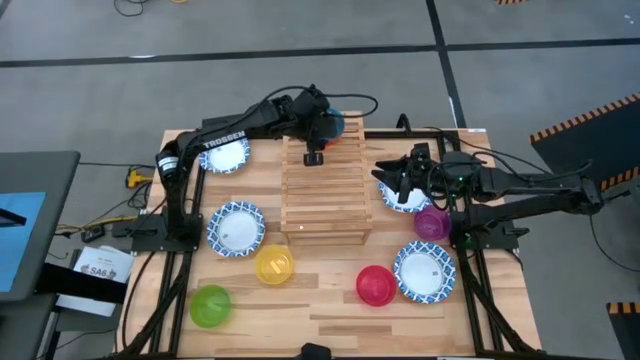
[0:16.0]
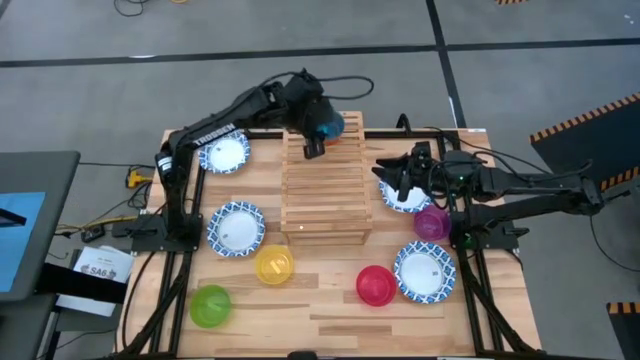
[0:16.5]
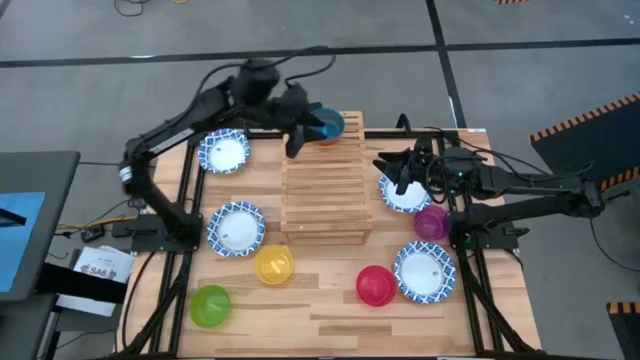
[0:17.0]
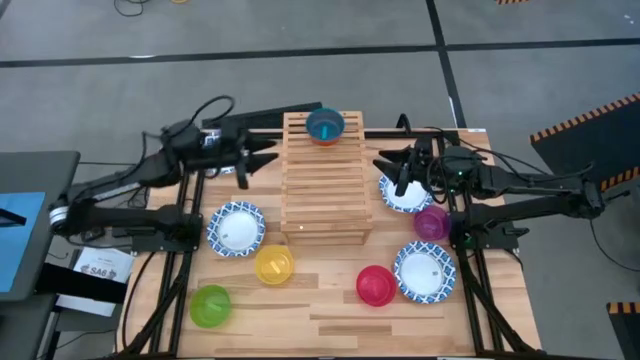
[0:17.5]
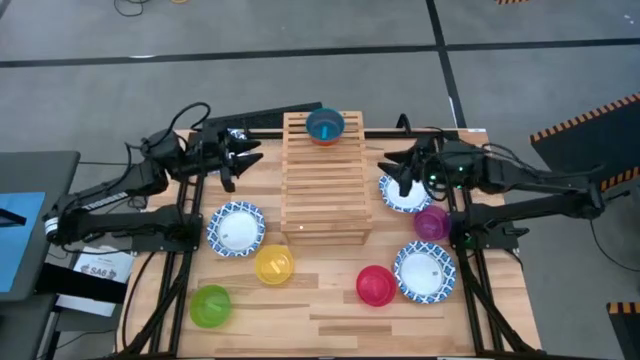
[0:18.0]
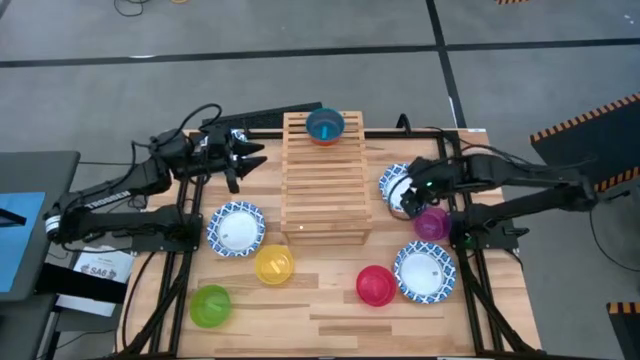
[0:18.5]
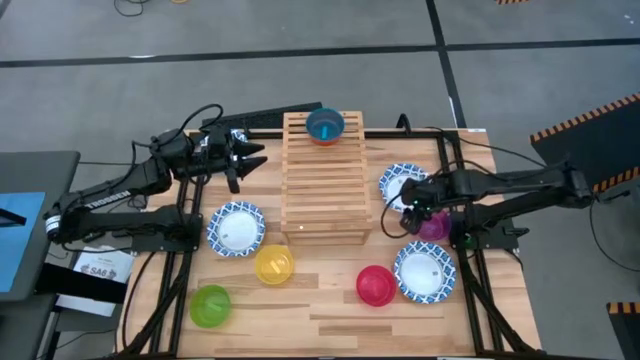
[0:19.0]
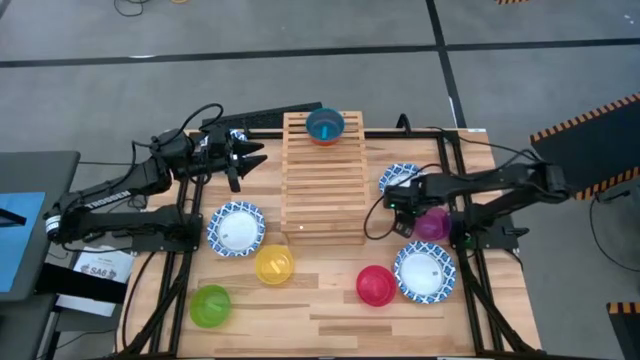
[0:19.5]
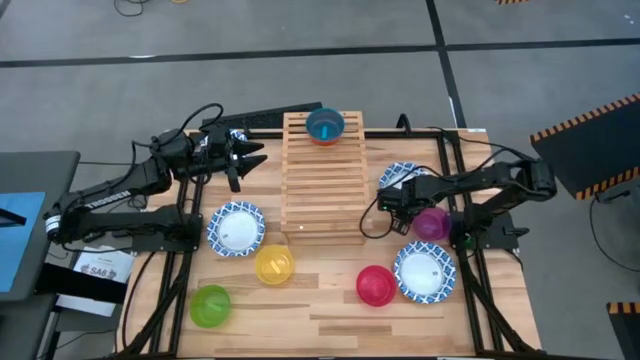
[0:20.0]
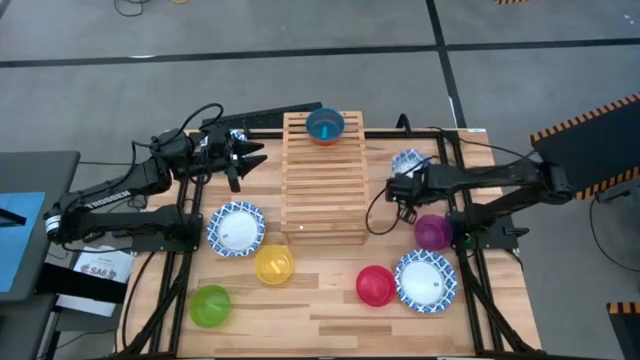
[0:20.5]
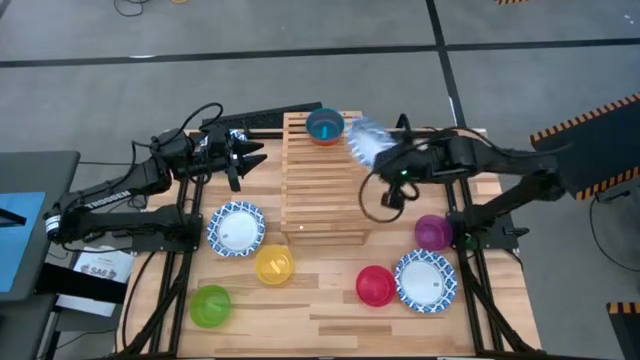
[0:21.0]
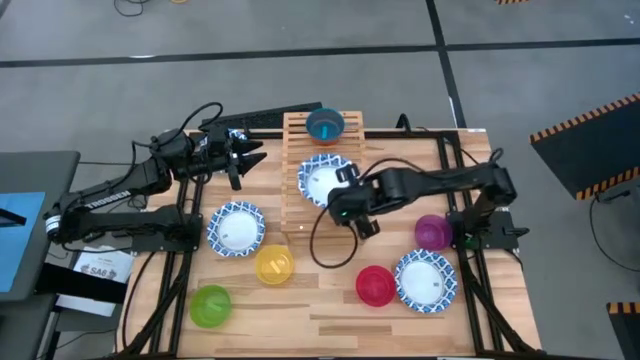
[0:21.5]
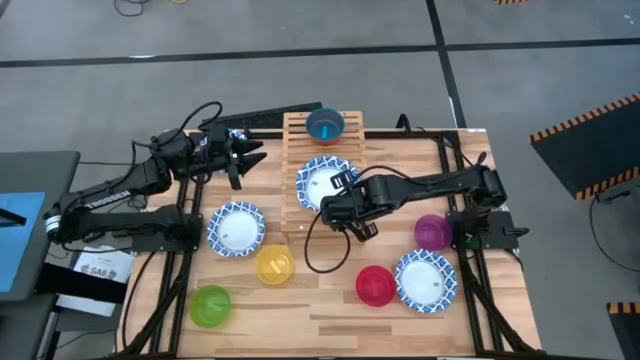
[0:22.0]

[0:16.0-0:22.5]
Task: Place and stack bowls onto a shelf
Put the blue patterned bowl on the shelf

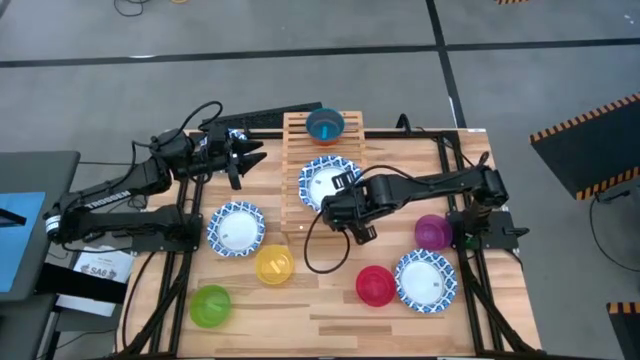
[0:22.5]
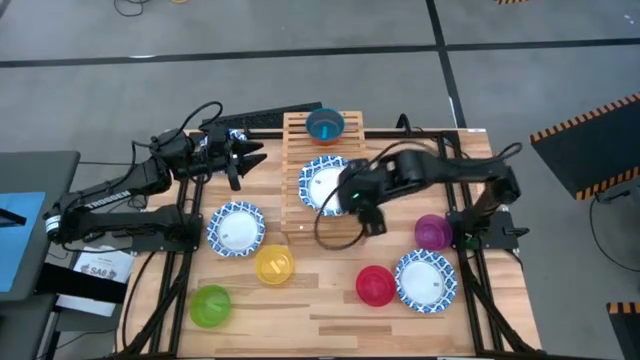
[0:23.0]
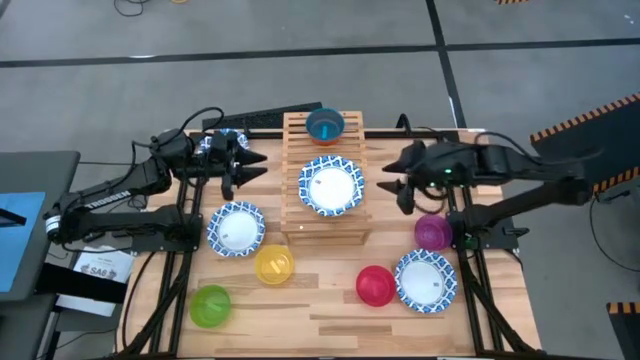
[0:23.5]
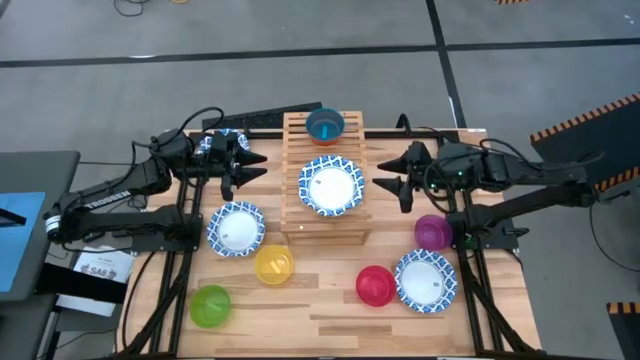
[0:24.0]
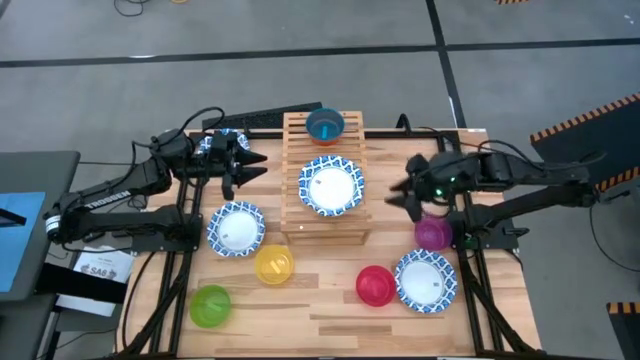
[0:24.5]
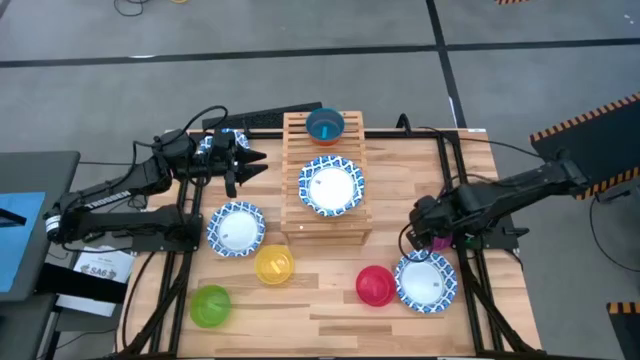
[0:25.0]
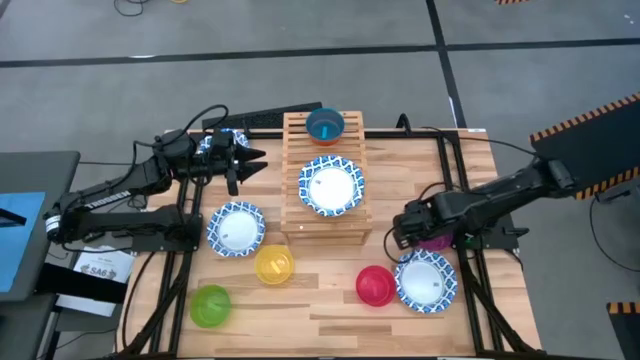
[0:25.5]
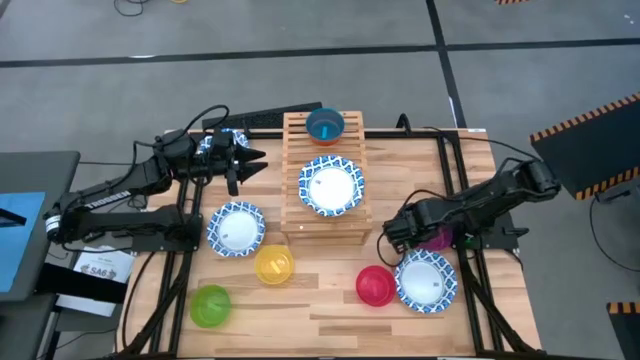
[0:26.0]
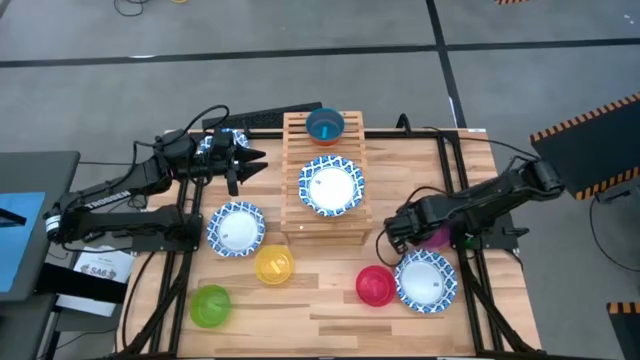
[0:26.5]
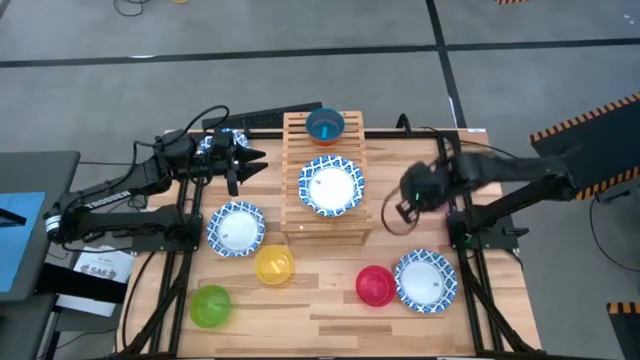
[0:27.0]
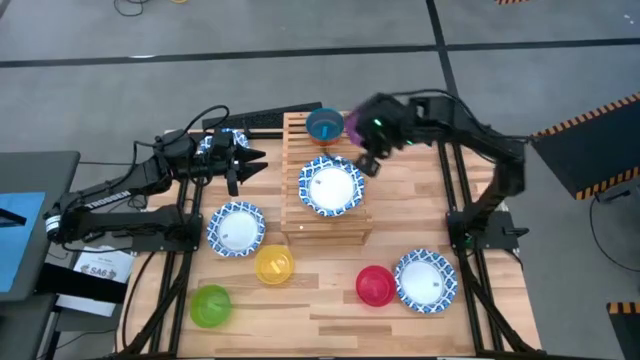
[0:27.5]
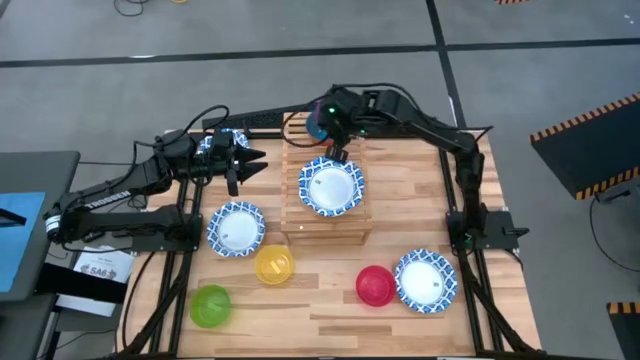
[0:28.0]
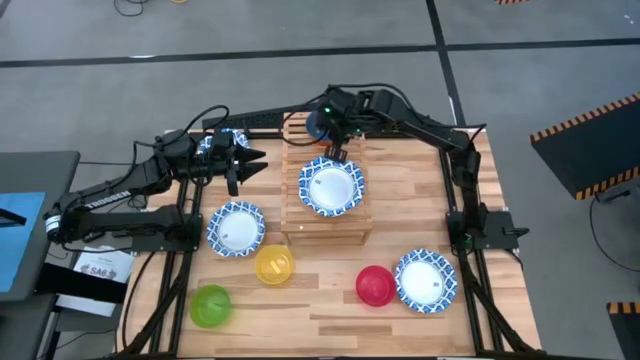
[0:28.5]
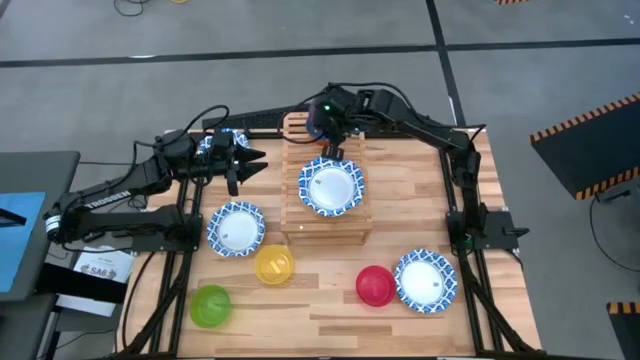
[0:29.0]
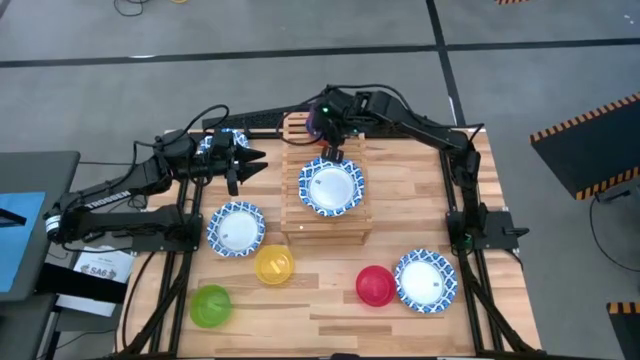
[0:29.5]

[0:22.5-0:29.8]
Stack the violet bowl on top of the blue bowl on the shelf

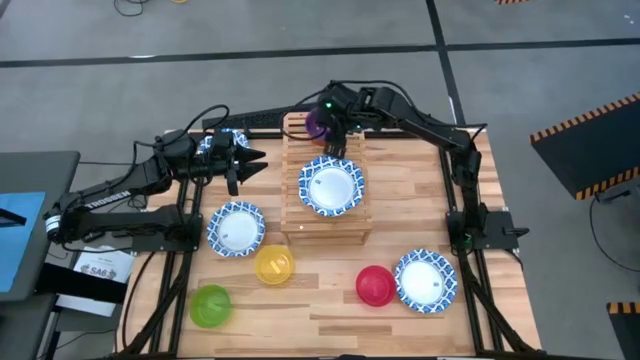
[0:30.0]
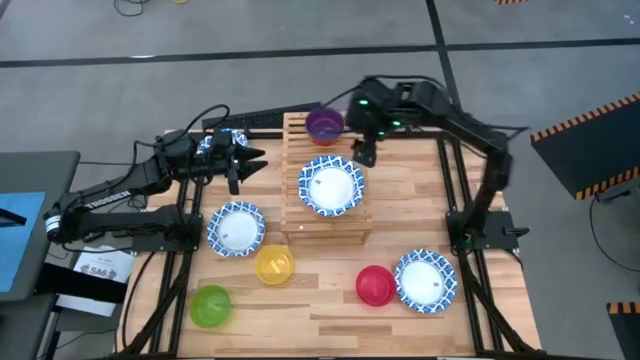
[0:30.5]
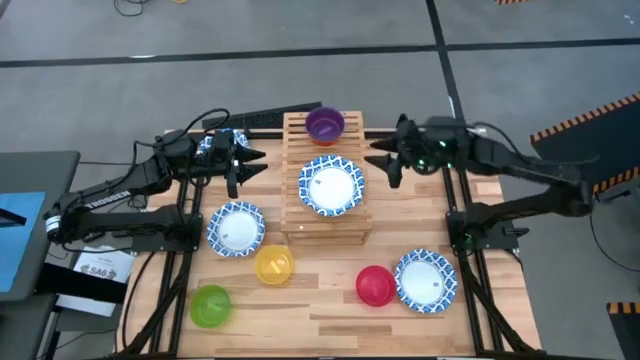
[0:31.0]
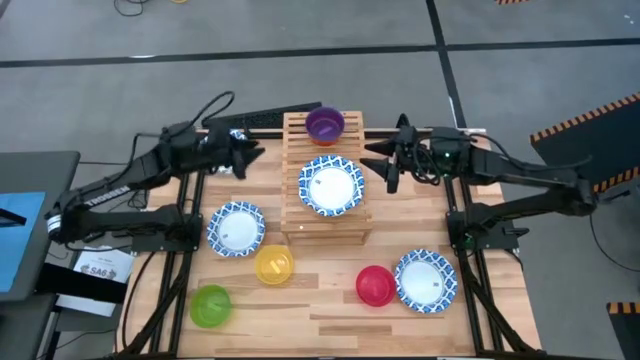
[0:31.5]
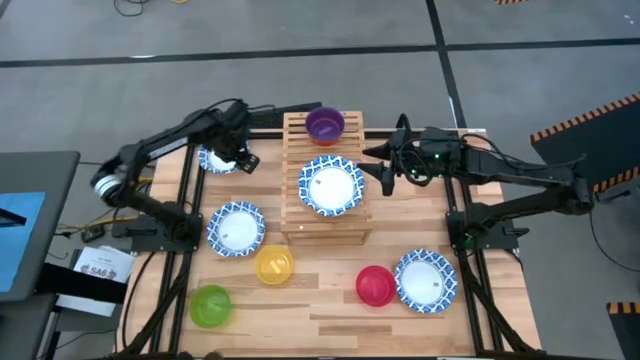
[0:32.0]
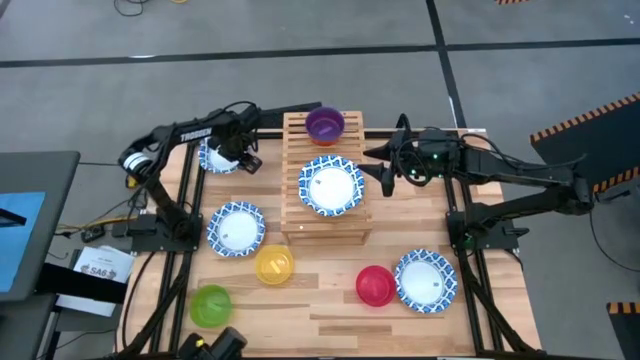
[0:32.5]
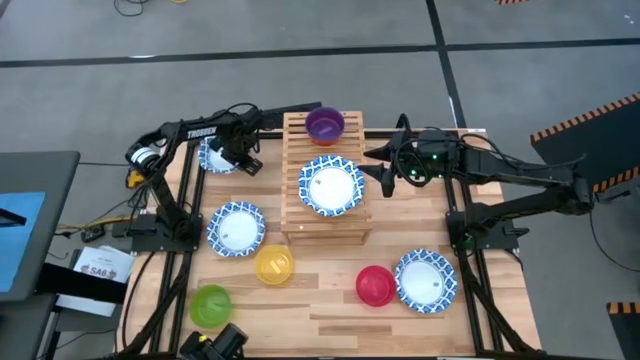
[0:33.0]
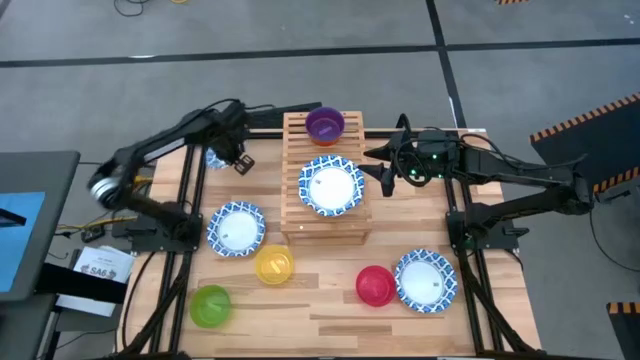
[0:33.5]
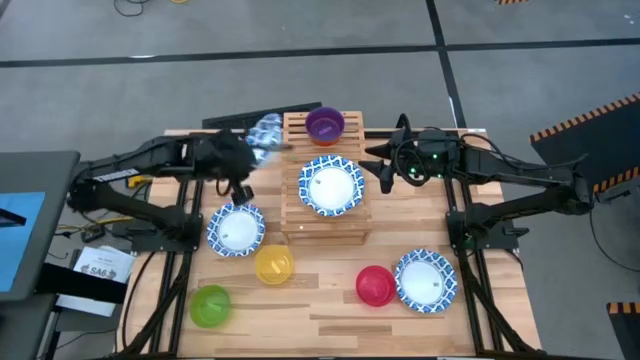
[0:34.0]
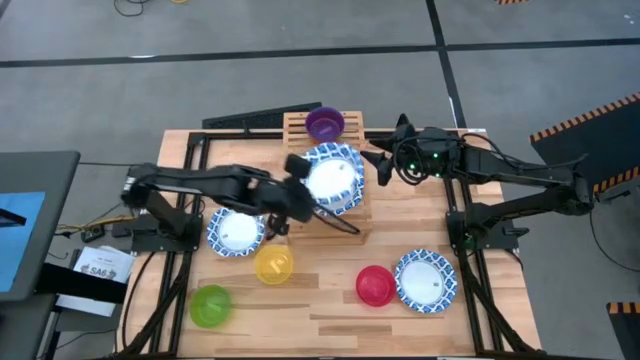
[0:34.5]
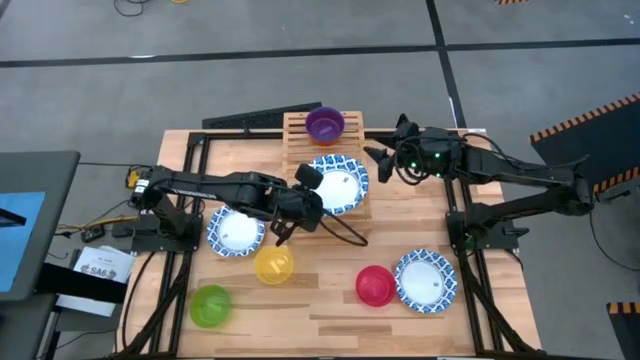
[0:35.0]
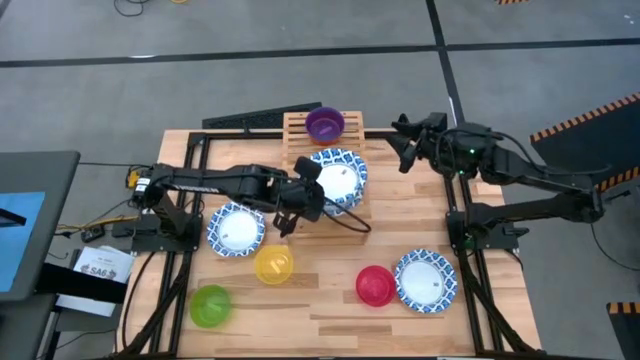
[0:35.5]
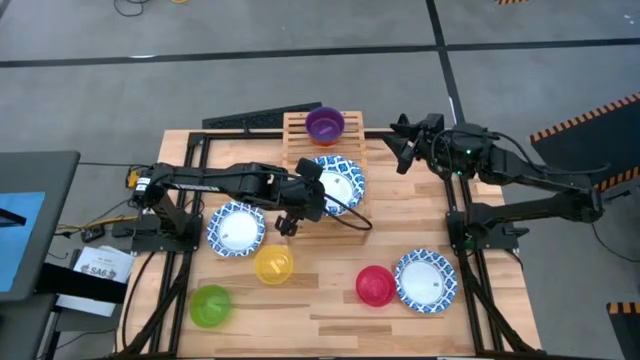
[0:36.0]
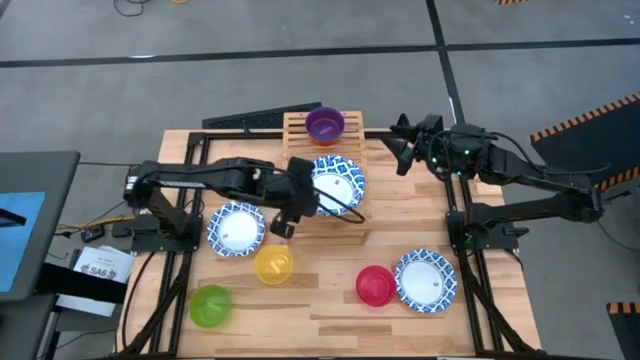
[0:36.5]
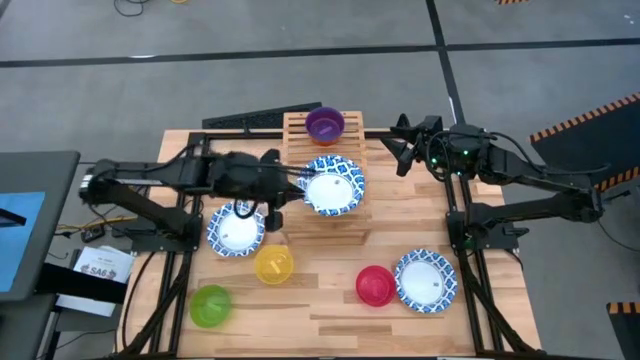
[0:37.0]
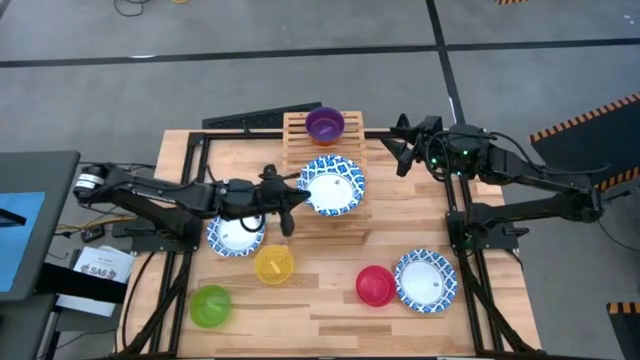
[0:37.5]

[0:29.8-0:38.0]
Stack the blue patterned bowl on top of the blue patterned bowl on the shelf
